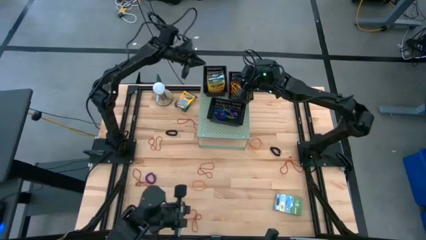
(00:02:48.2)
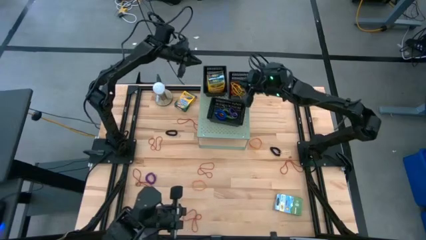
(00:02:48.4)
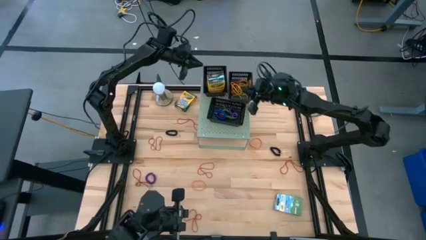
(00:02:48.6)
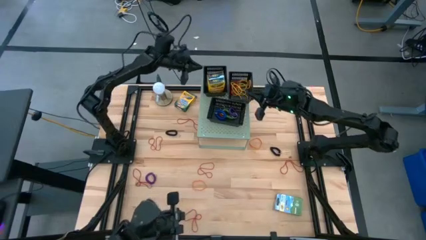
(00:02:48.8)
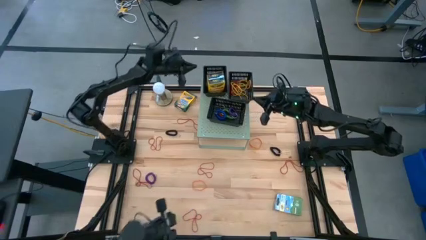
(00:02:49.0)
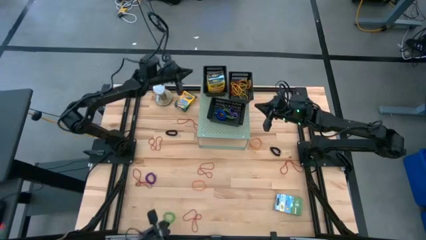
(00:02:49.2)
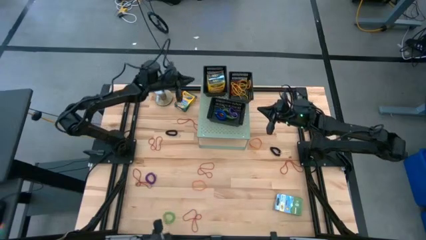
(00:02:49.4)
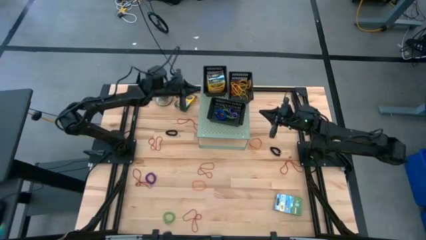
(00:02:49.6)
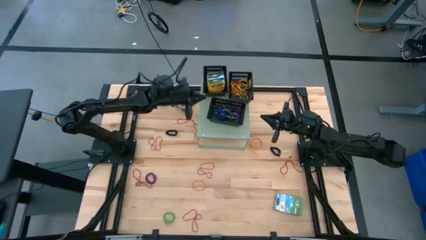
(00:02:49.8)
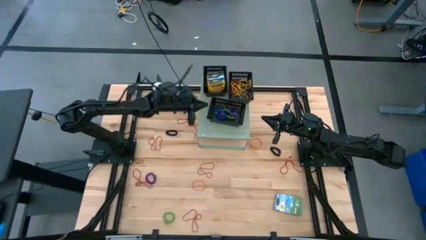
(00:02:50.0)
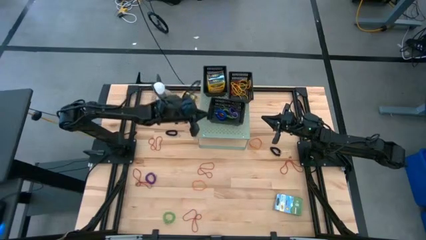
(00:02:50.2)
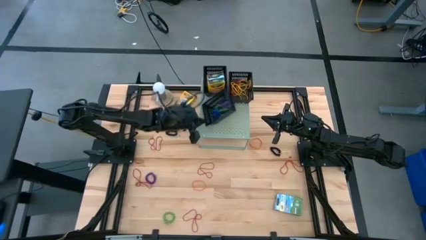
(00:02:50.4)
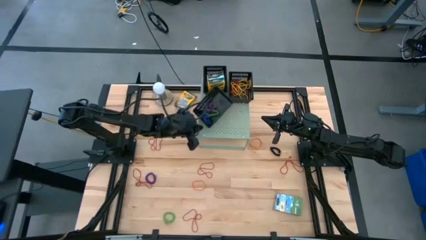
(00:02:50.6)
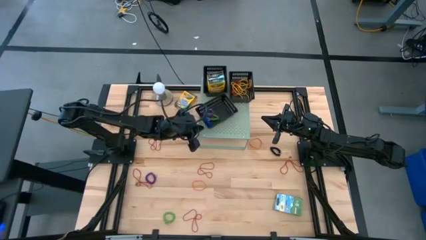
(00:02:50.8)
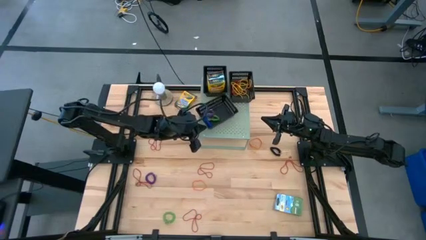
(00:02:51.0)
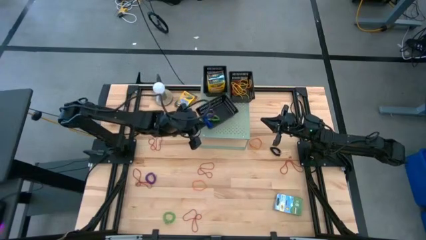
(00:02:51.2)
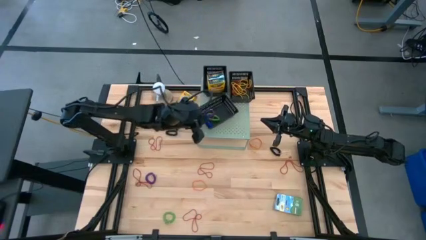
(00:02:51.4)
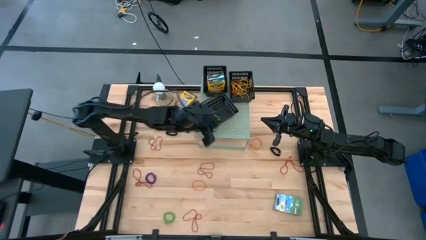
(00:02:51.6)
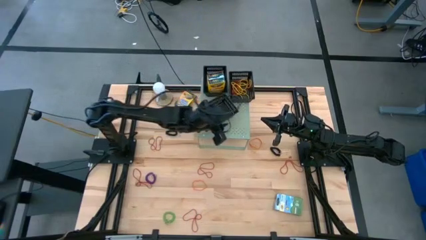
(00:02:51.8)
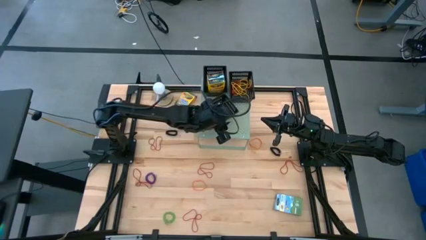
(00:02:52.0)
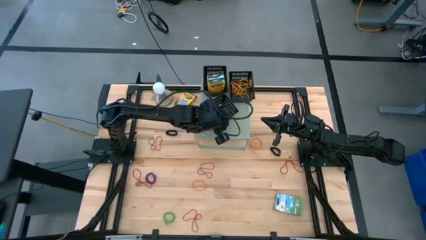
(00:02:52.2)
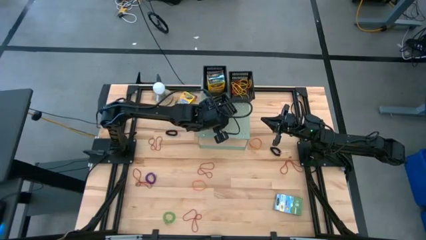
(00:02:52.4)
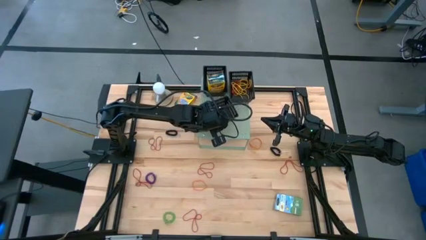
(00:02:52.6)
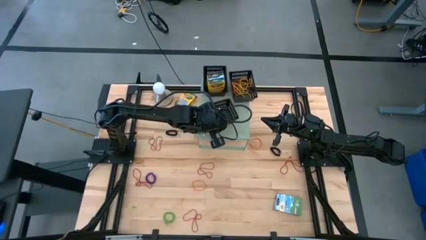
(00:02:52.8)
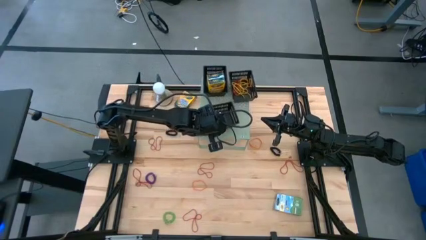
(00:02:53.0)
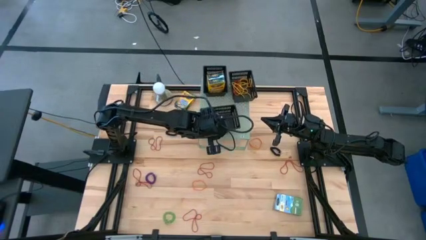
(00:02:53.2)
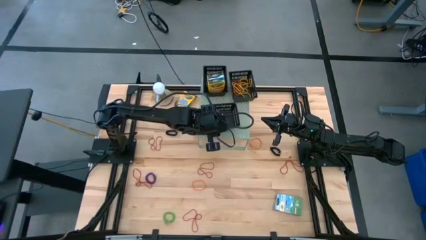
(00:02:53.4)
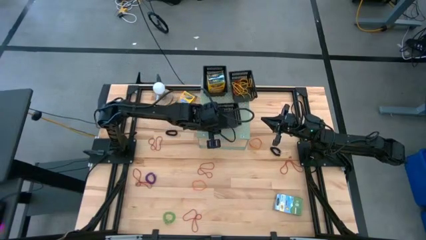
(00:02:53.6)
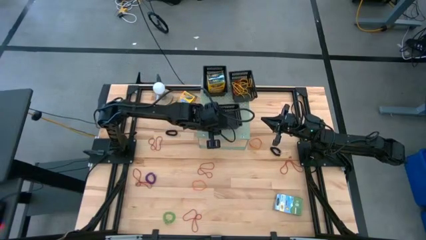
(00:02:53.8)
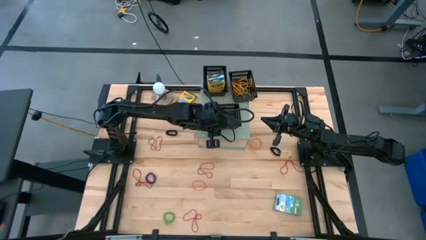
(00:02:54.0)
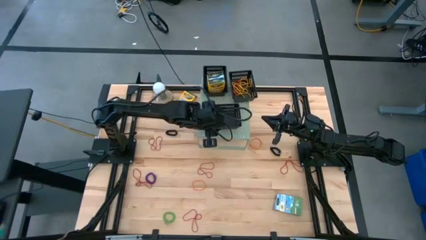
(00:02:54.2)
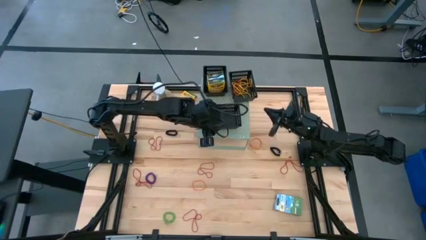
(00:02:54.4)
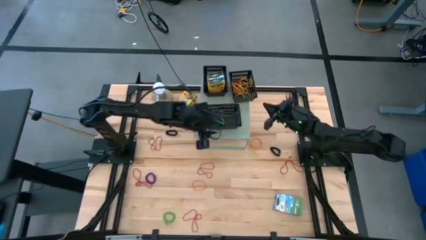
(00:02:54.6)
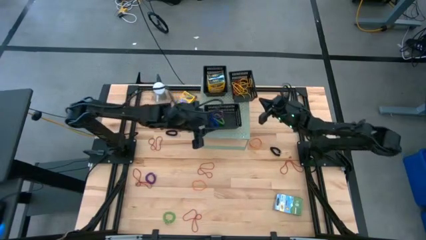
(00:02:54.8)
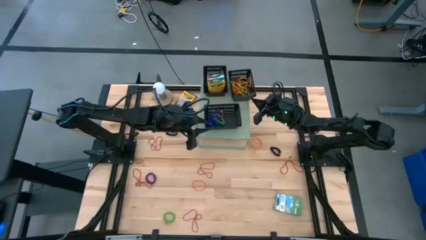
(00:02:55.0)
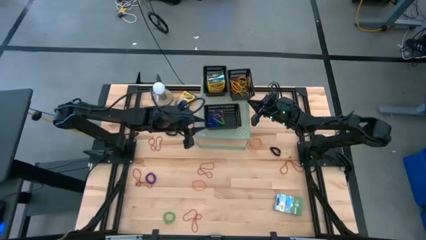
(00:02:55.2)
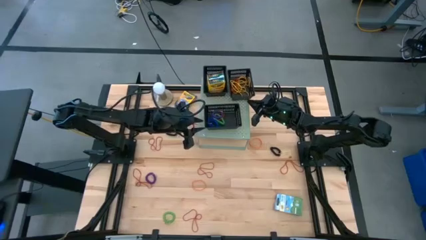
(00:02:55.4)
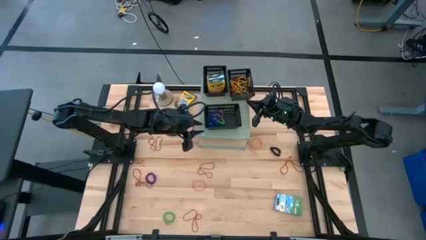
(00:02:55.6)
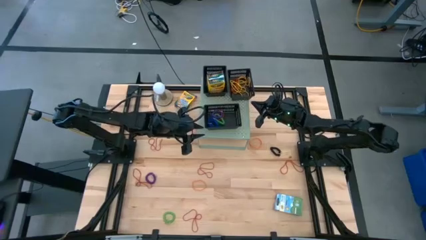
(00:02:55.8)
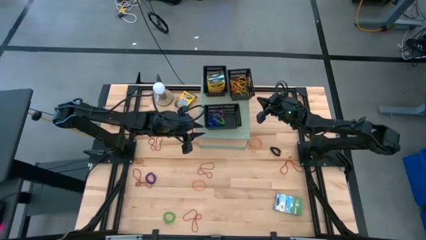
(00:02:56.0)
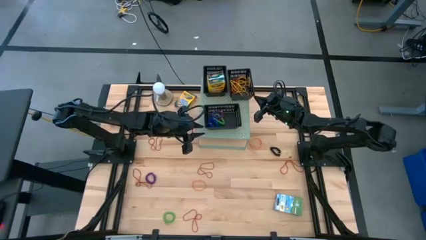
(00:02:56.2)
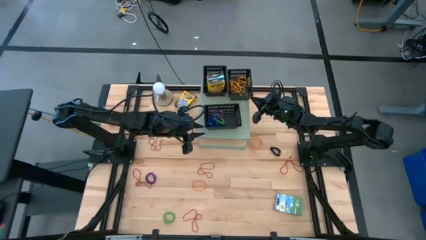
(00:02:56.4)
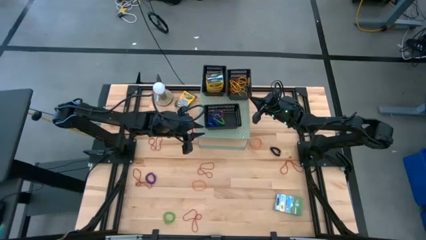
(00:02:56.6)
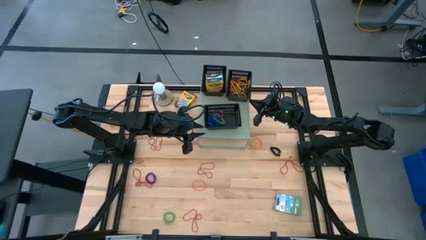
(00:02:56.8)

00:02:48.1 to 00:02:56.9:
Task: Pick & Place Office Desk Supplies
Adjust the black bins on the shelf

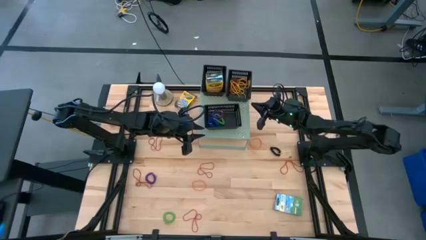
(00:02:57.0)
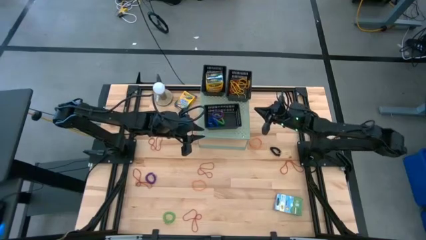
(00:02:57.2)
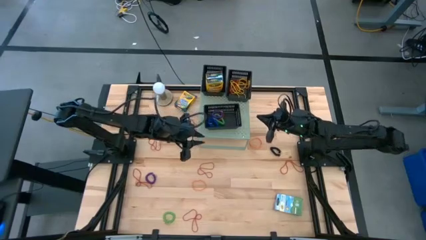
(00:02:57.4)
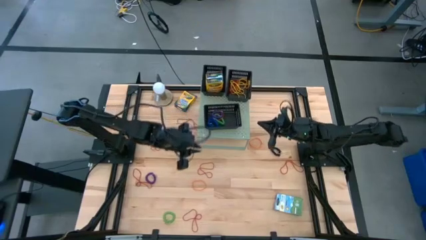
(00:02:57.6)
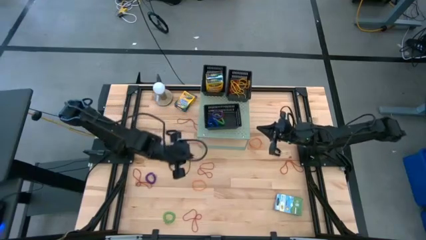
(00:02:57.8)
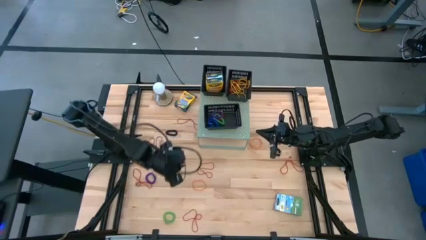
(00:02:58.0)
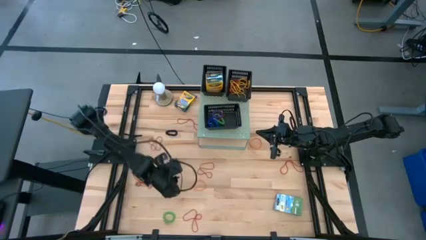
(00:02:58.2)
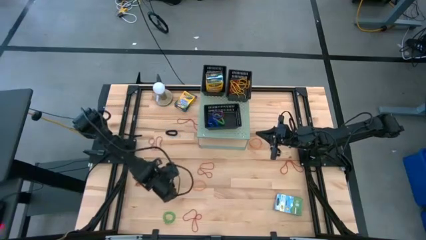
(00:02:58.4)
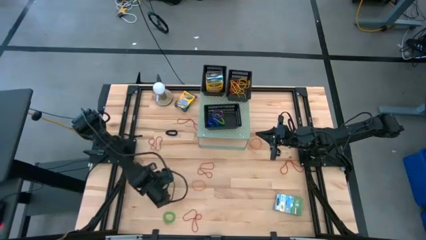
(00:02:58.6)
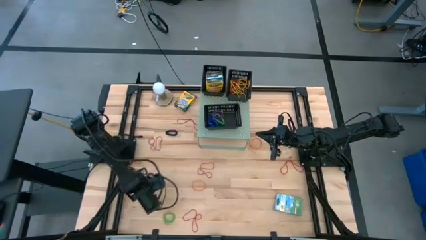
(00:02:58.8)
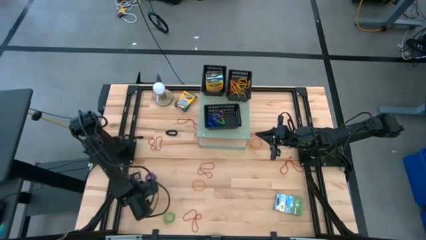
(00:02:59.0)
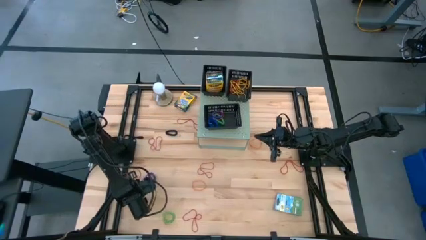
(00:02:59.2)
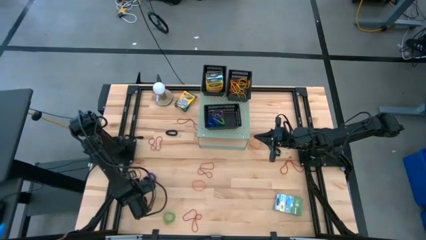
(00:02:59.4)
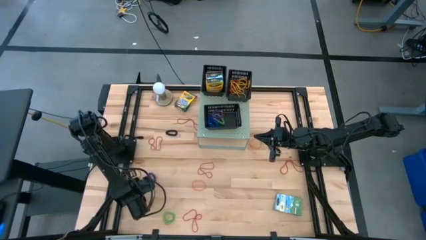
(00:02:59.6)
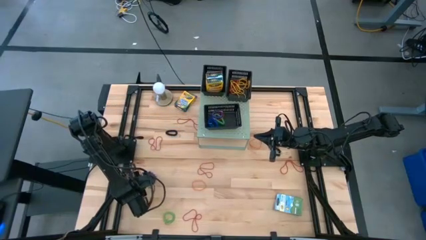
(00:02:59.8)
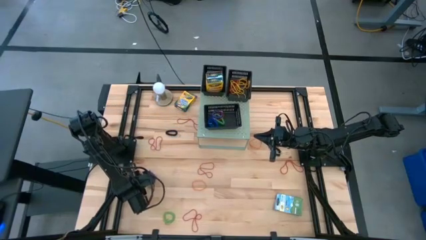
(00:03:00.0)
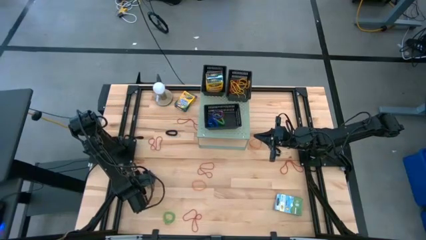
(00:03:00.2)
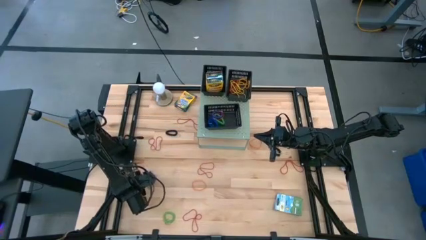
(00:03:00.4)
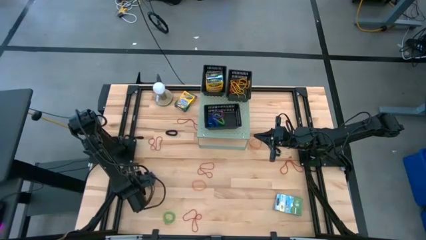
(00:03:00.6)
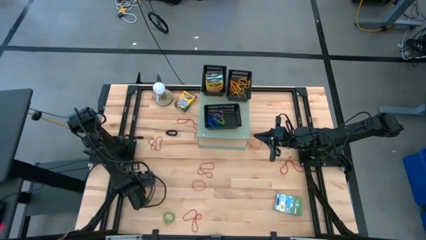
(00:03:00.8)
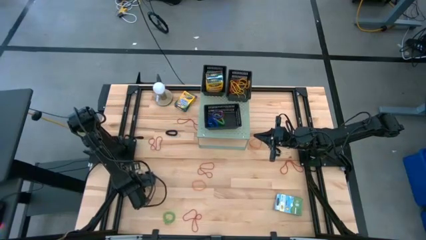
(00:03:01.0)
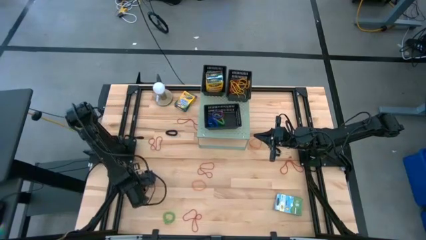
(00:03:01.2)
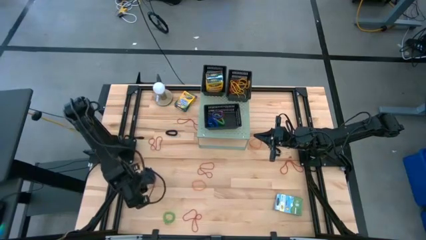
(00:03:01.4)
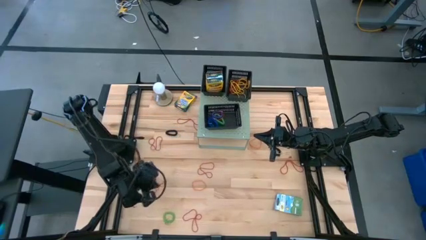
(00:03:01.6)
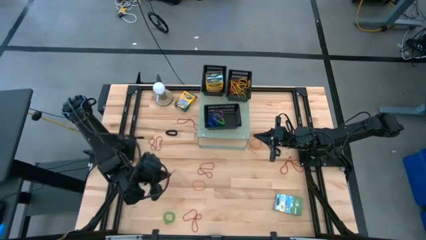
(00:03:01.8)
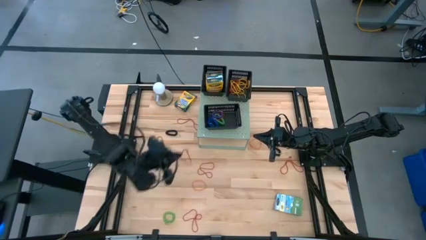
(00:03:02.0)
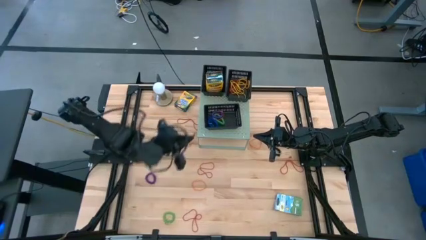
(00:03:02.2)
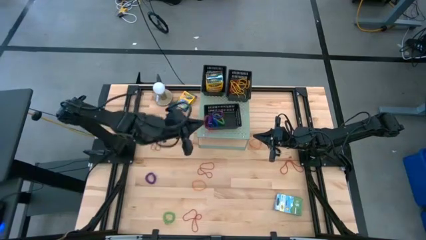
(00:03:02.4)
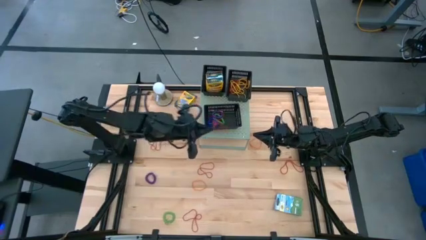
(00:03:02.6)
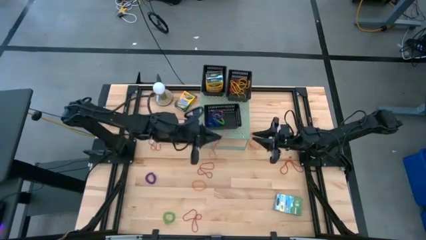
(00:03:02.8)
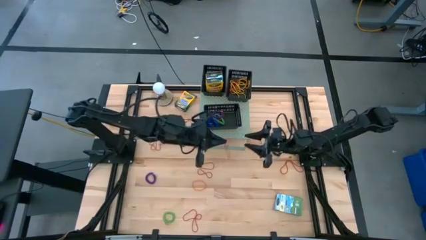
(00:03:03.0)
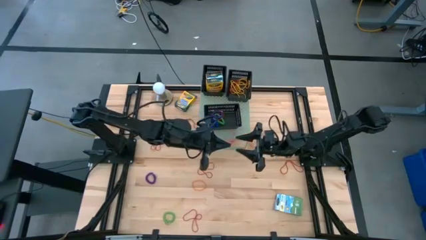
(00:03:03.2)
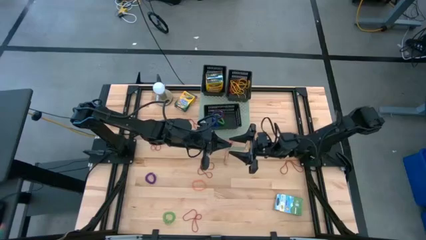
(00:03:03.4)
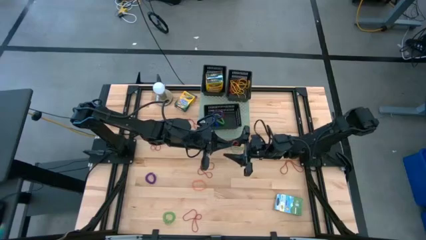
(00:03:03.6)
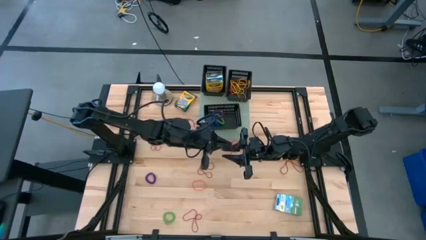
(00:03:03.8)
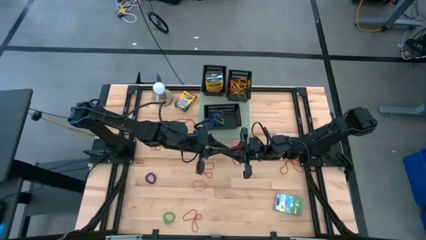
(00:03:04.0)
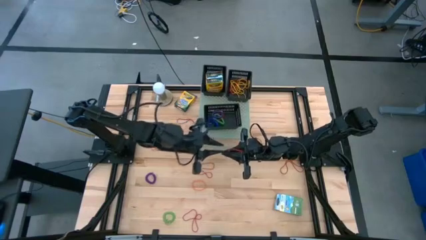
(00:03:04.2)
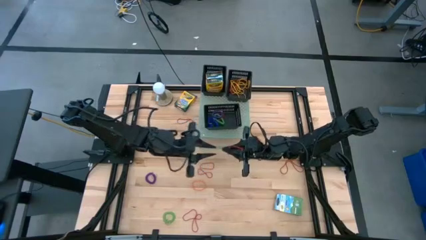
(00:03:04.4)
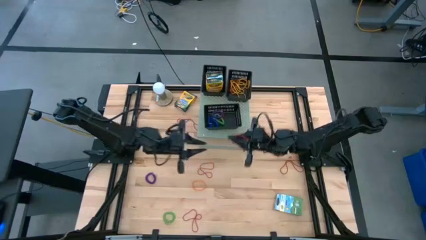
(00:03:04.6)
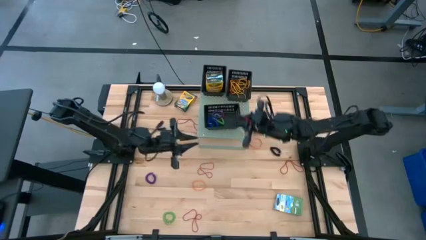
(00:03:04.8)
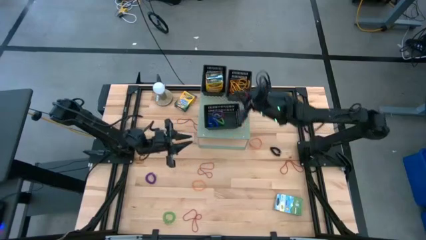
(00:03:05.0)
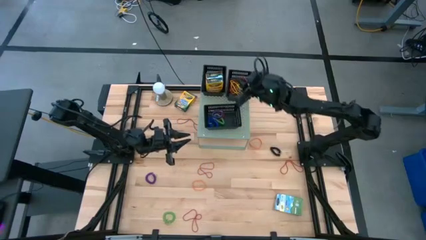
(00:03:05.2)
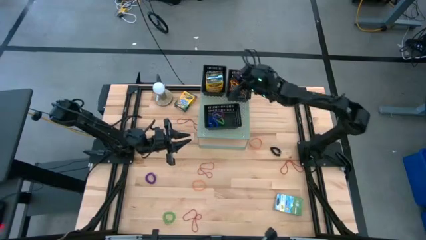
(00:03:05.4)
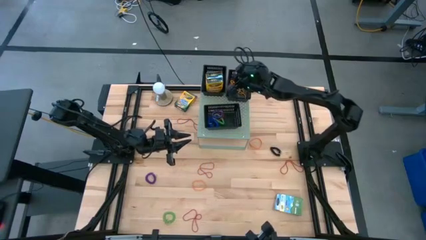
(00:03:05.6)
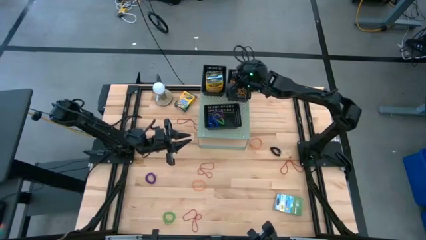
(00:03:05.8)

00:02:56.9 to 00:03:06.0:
Put the red rubber band into the top right black bin on the shelf
